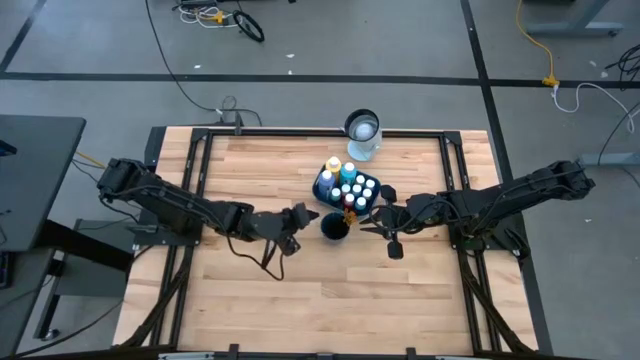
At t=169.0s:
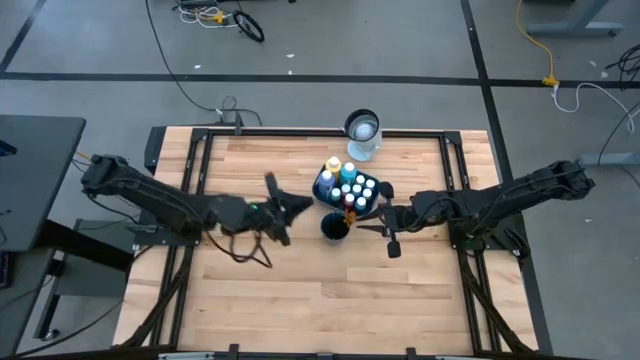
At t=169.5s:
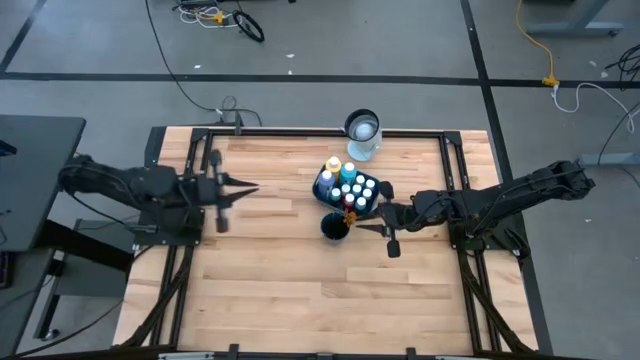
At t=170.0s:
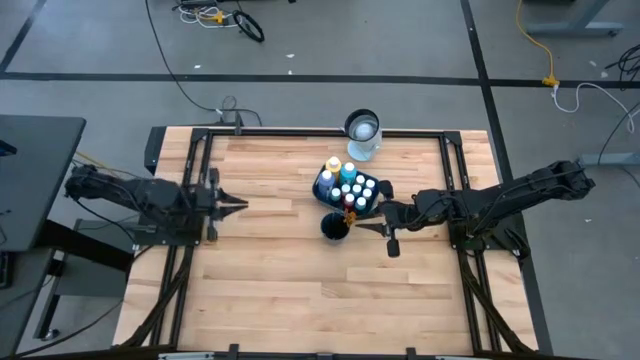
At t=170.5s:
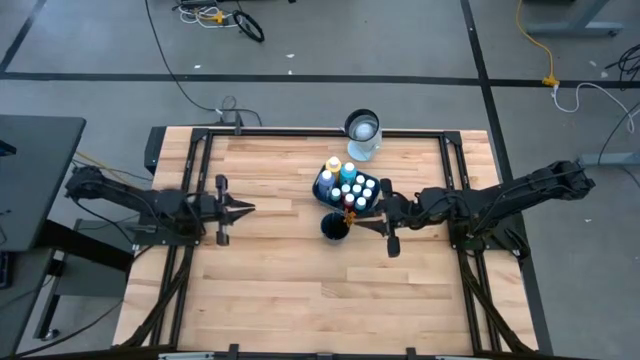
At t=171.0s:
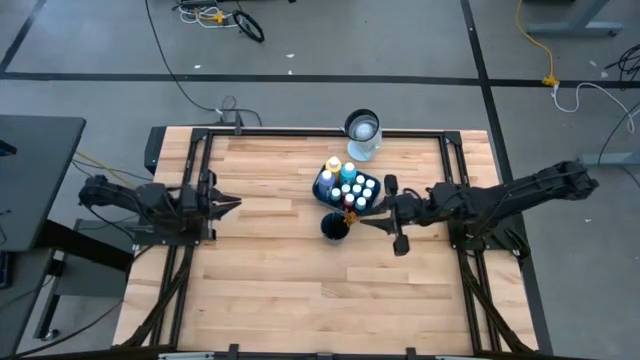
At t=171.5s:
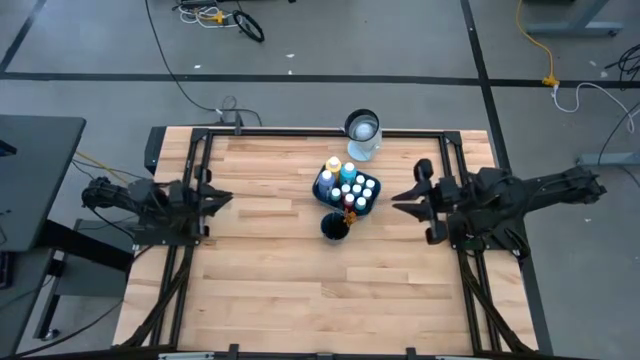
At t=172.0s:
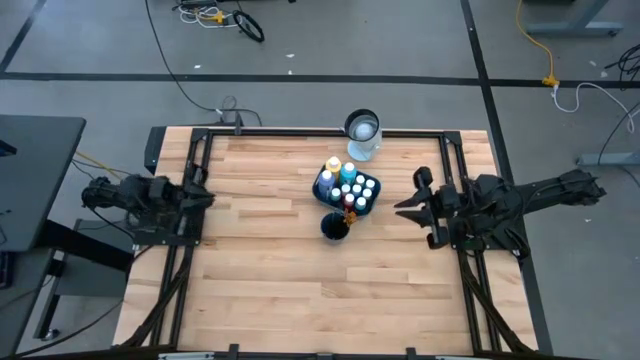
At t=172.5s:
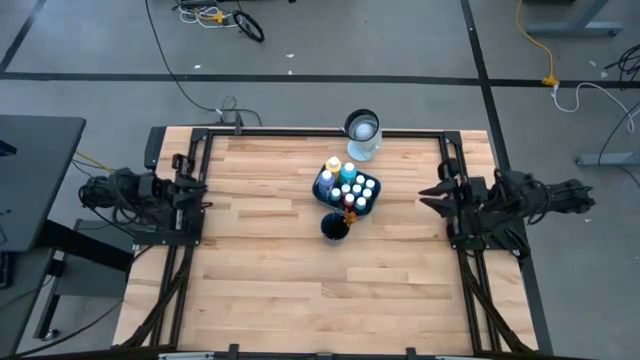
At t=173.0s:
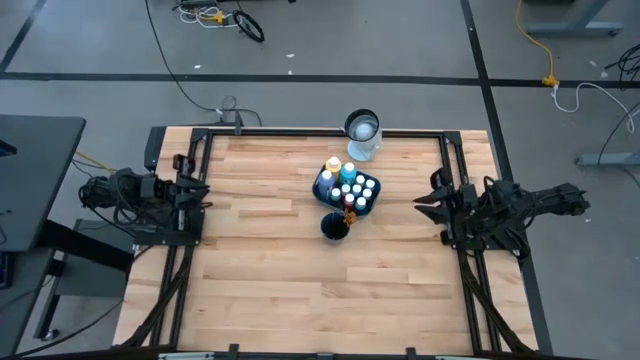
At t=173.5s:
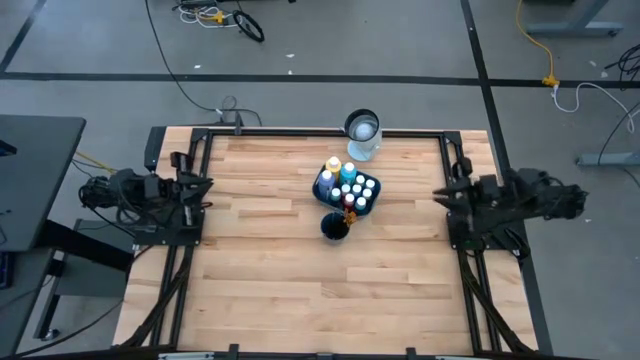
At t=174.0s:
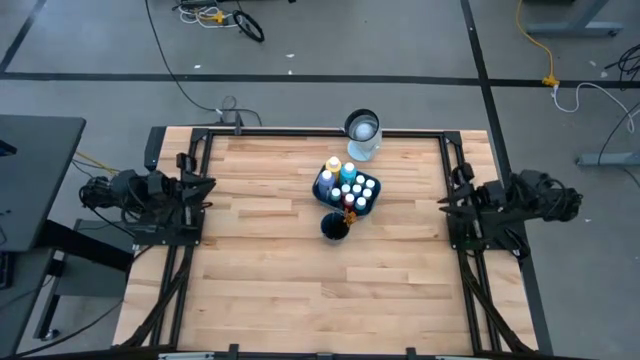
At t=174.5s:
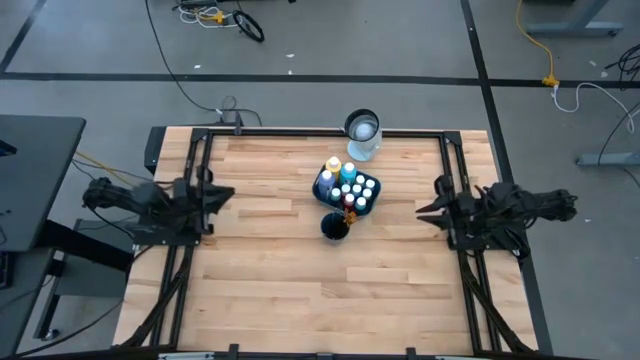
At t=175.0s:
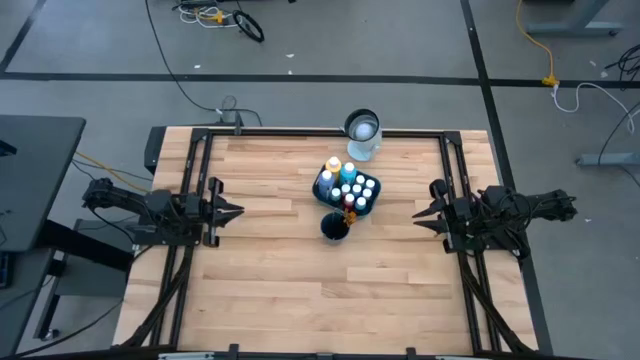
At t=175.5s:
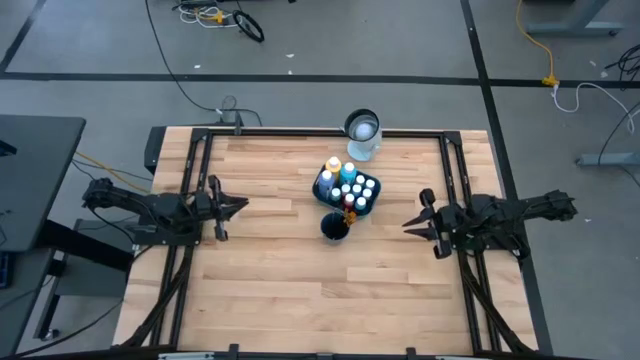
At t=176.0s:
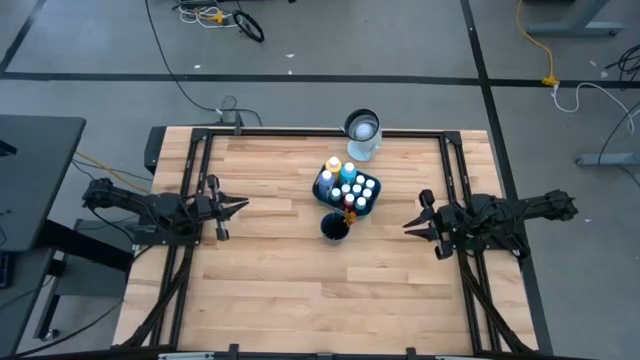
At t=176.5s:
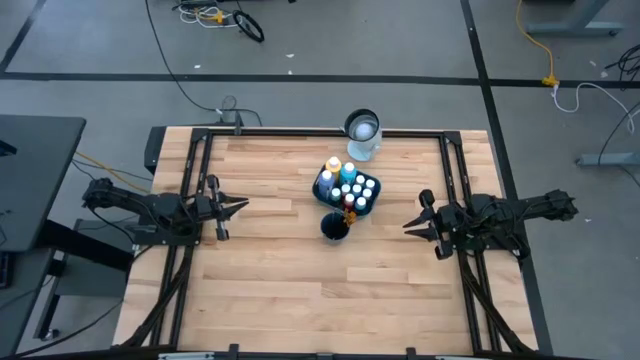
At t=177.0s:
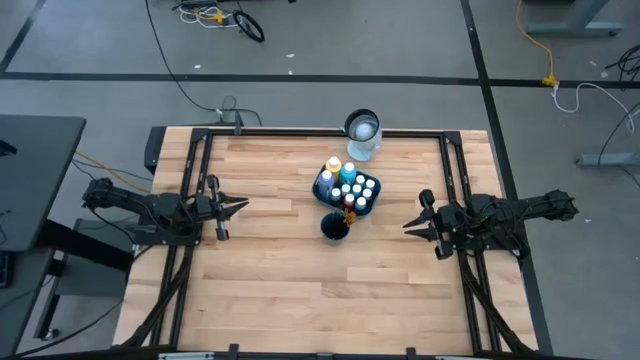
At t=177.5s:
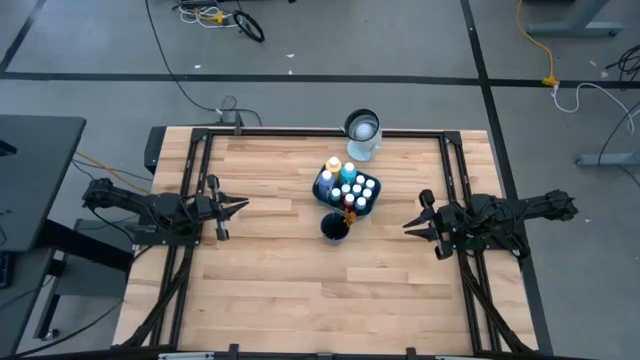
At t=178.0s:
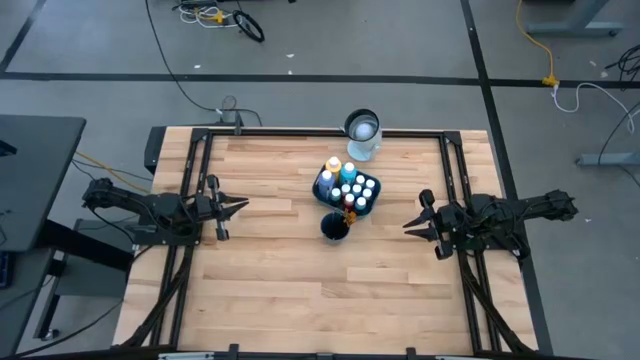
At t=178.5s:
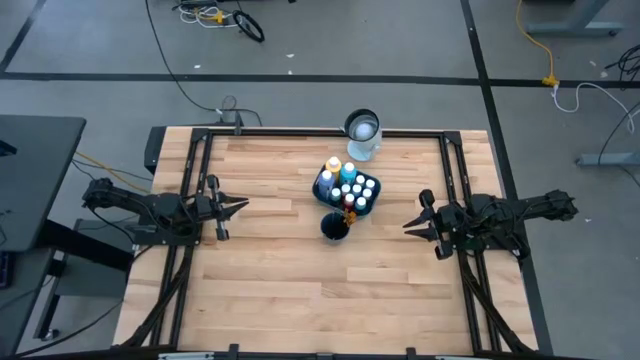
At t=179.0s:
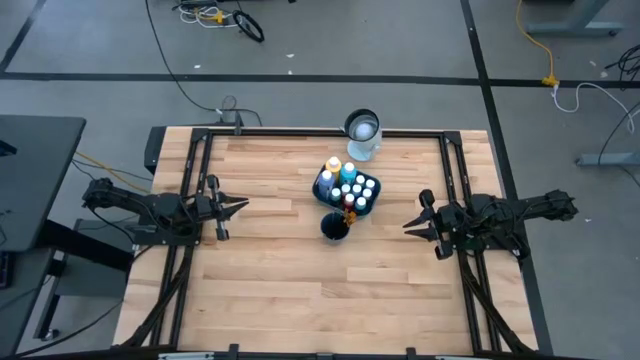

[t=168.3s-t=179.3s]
Task: Pick & Place Paint Supplies
Return to Home Position

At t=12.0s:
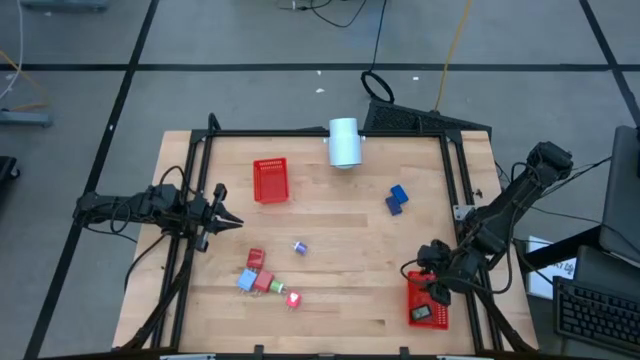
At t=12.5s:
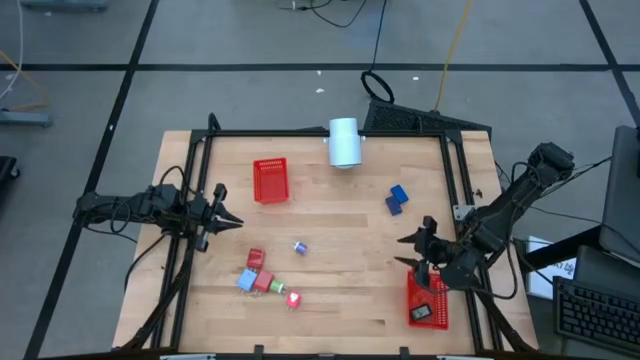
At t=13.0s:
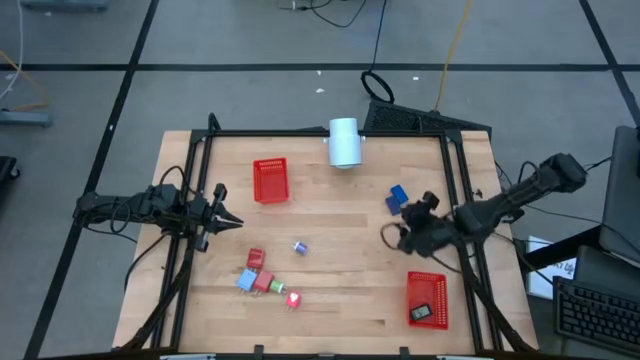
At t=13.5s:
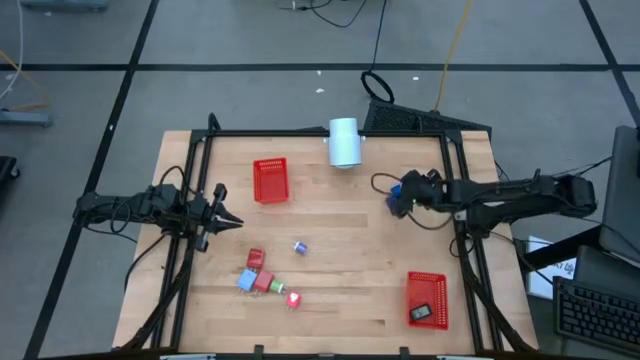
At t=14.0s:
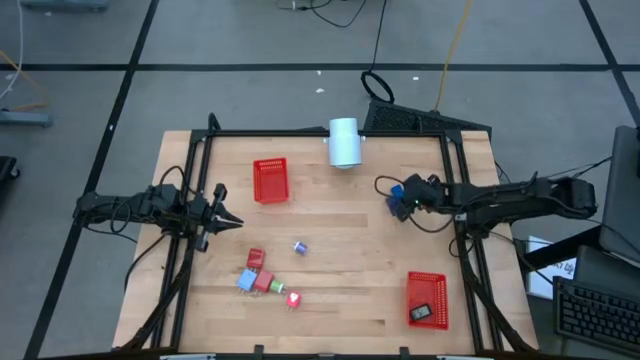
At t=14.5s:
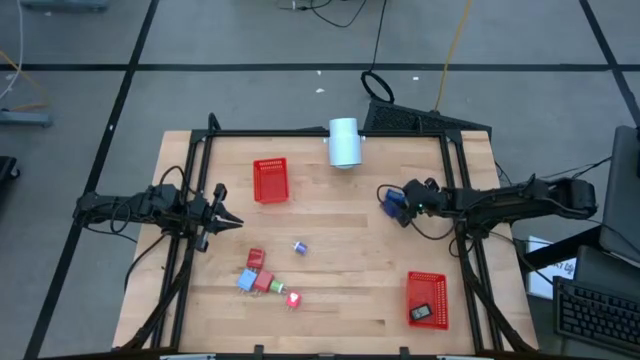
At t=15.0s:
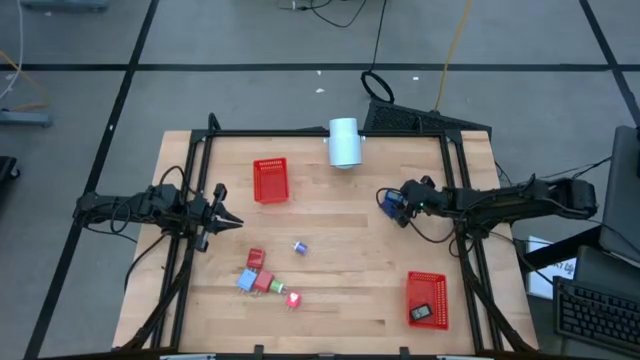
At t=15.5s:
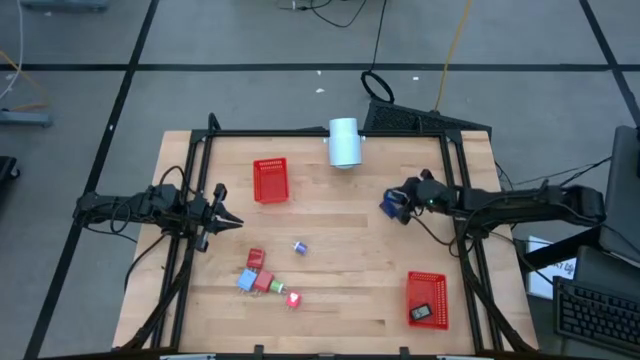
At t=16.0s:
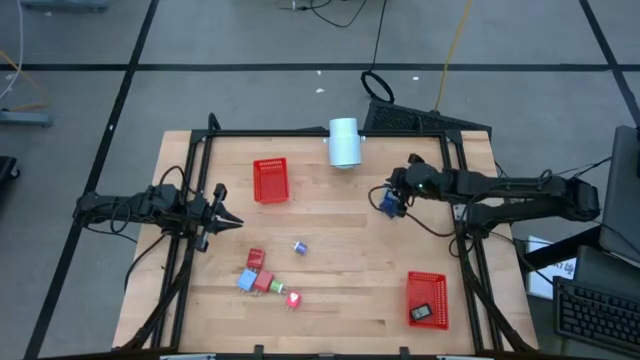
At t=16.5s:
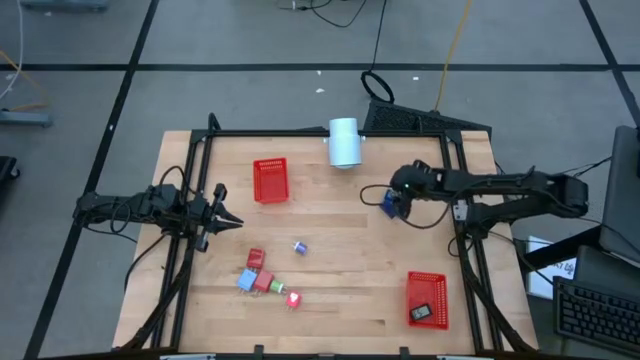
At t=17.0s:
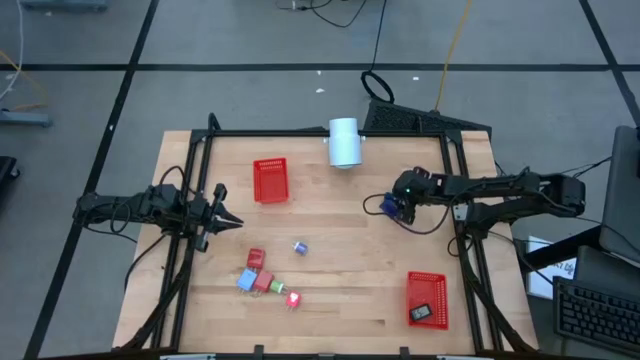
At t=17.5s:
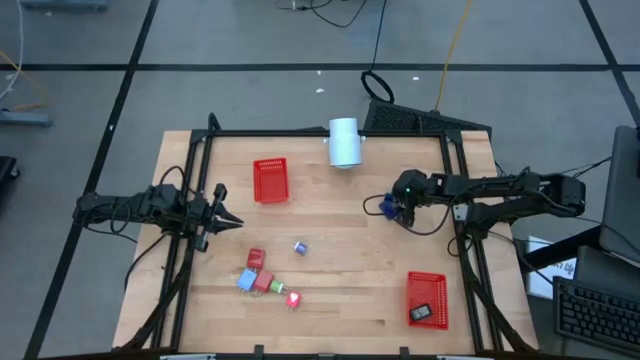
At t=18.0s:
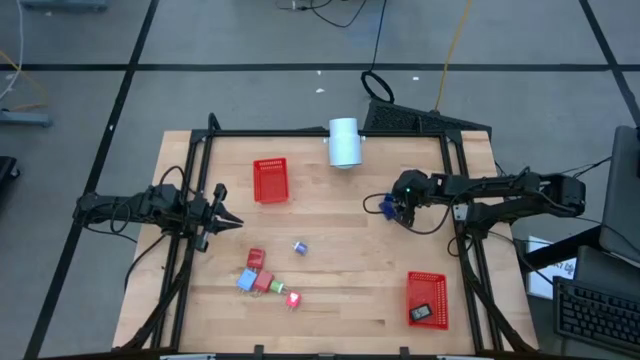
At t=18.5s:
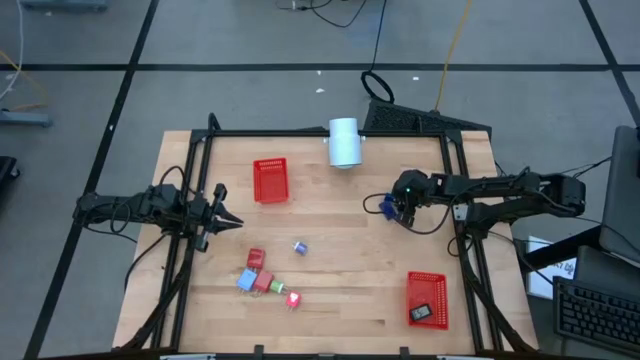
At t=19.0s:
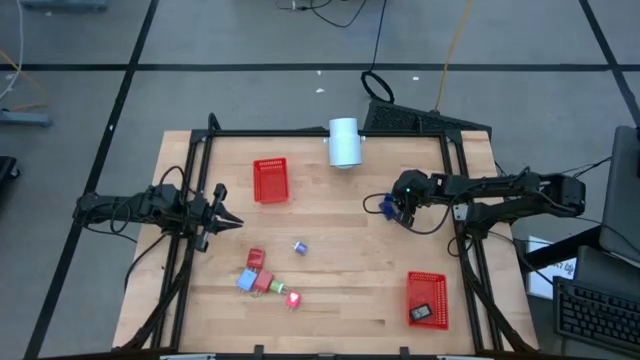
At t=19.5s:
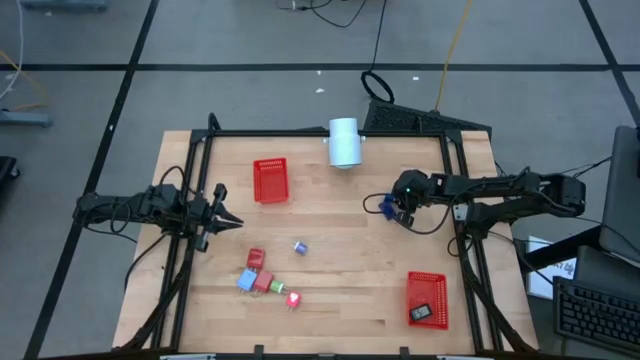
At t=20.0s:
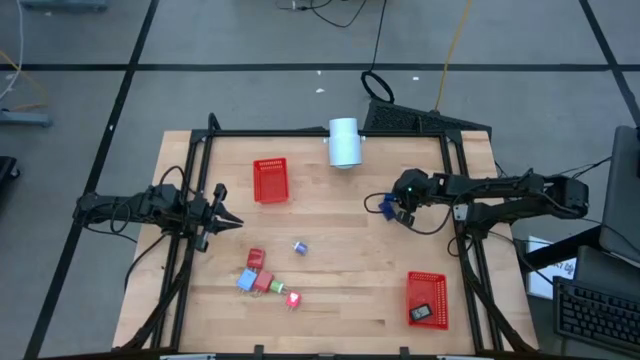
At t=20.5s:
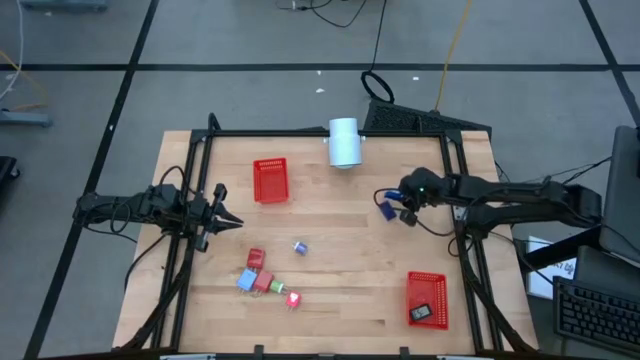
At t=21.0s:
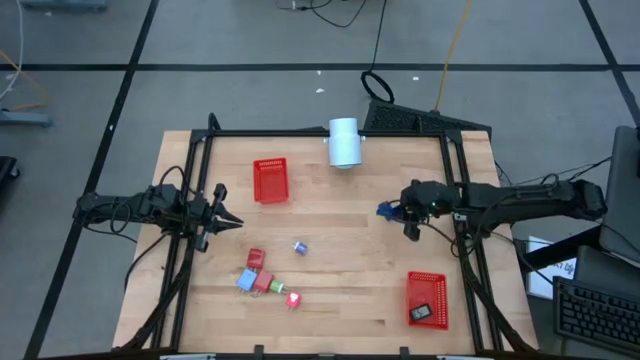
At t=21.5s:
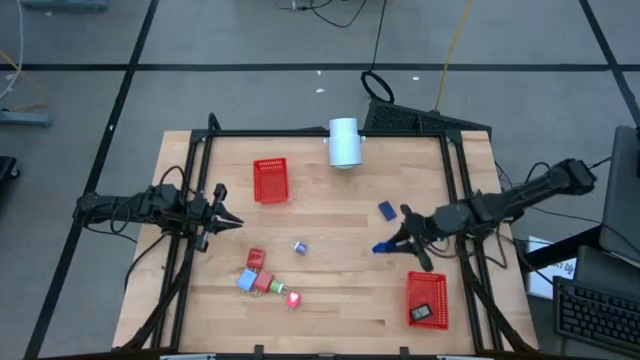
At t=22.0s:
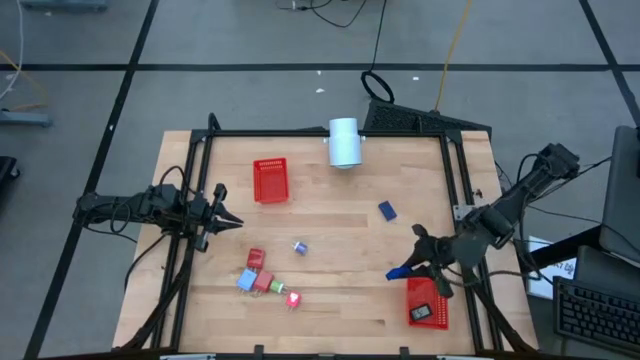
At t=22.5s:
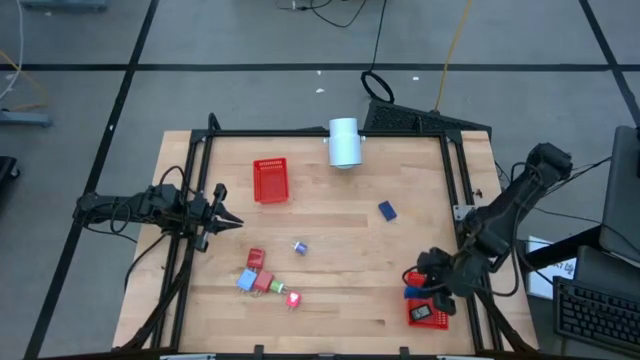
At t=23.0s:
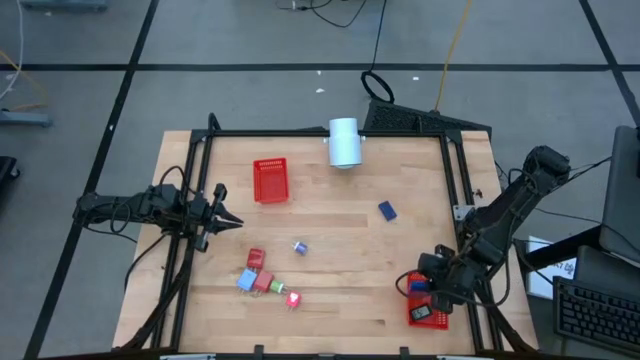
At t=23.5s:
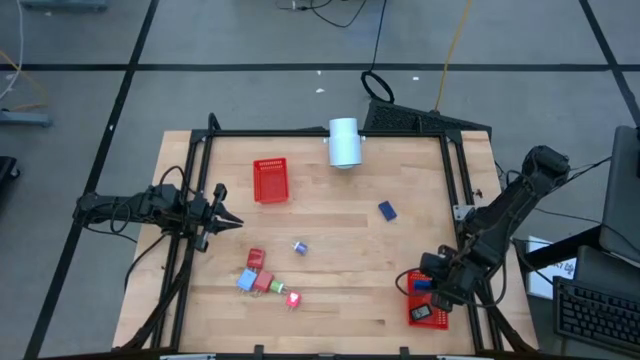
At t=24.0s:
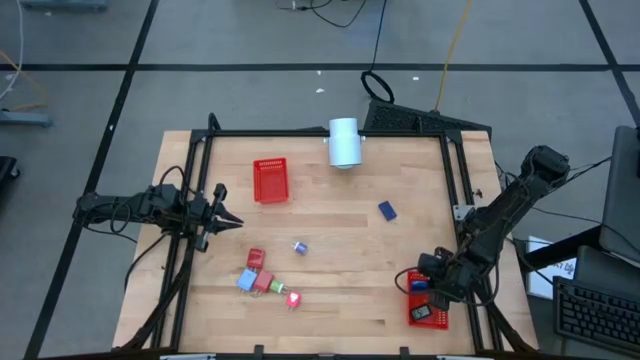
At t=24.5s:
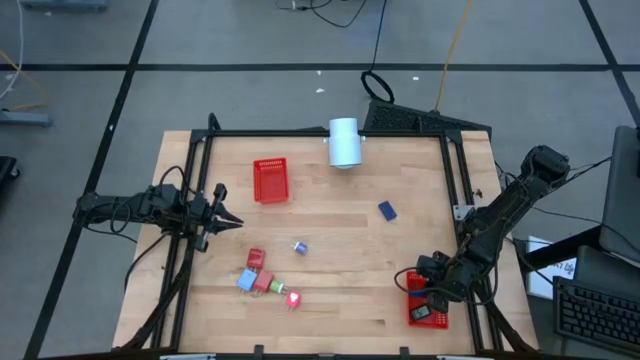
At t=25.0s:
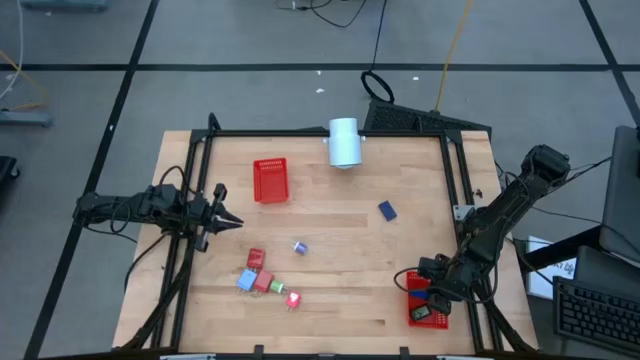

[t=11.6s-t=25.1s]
Task: Pick & Place Office items
Put the blue digital timer into the bottom red bin
